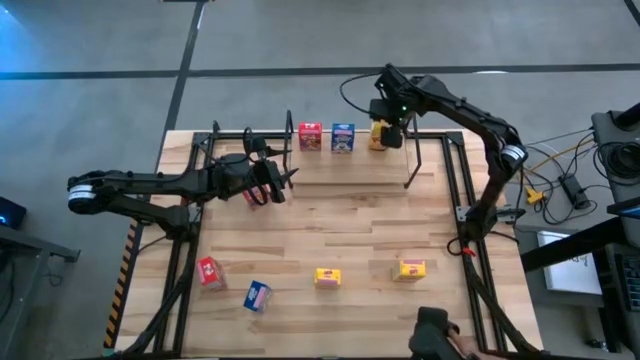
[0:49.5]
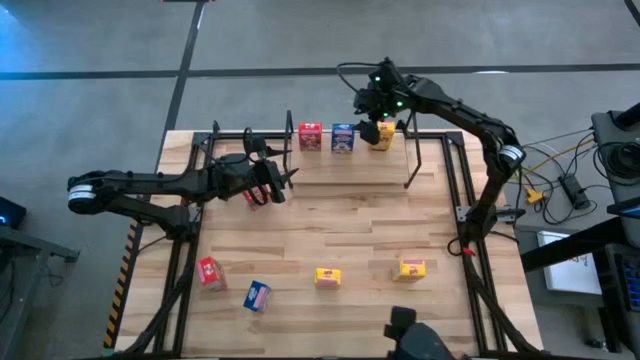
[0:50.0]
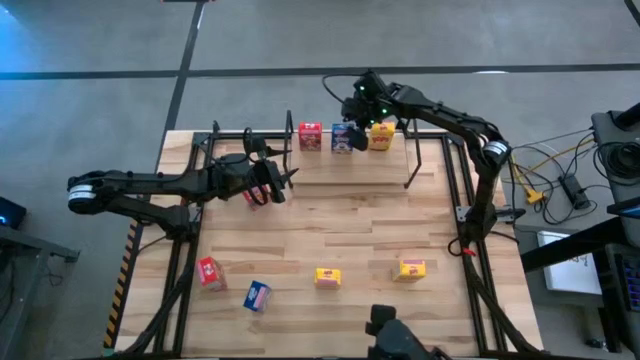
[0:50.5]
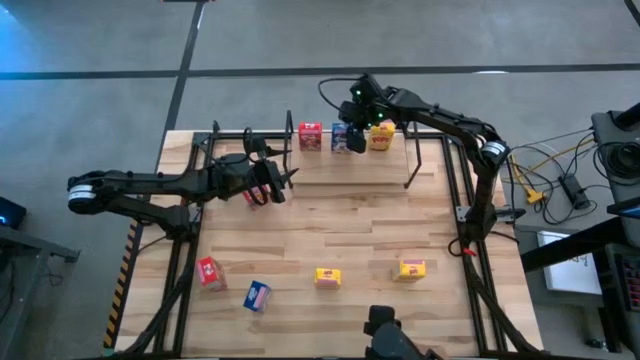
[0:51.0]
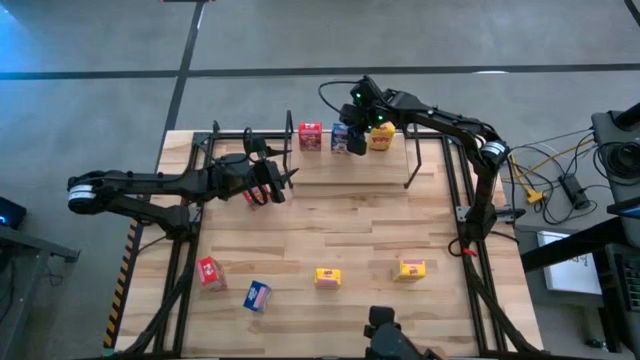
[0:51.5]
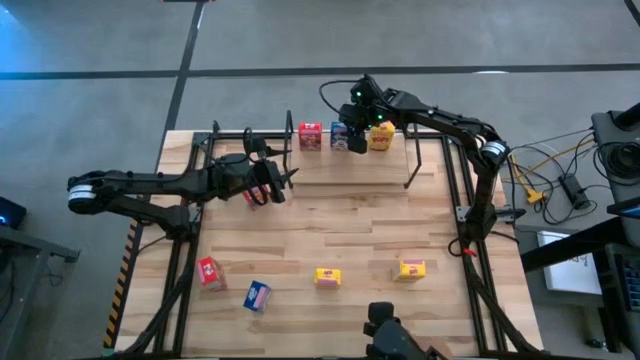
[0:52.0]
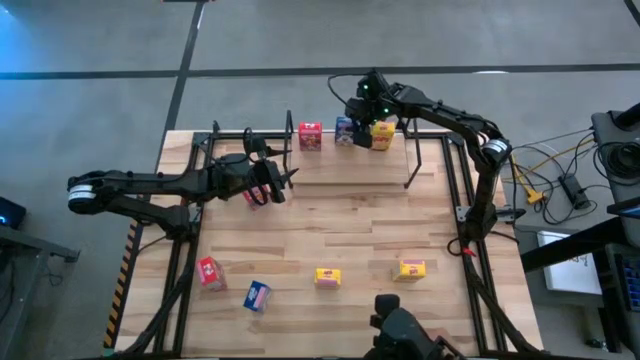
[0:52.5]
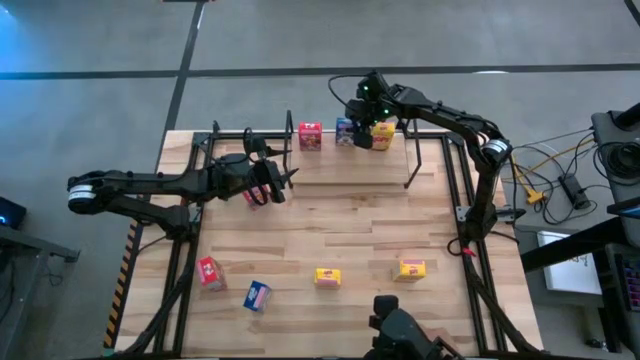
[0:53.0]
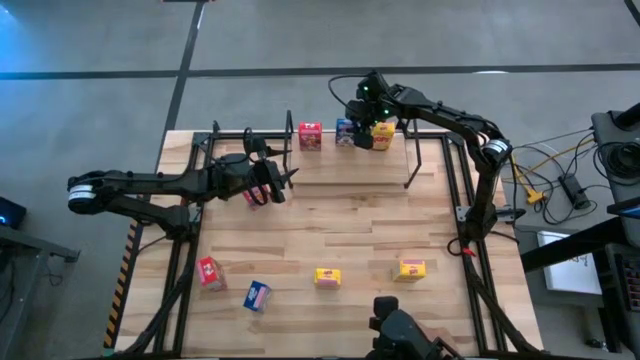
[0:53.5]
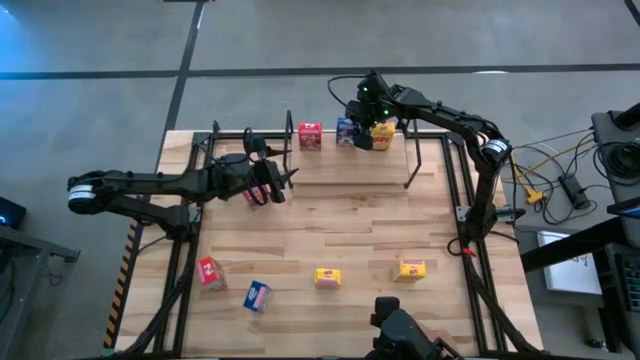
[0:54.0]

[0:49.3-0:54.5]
Task: Stack cereal on shelf
Adjust the blue cereal box on the shelf

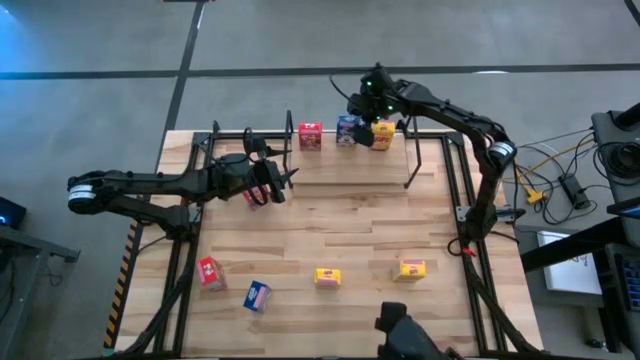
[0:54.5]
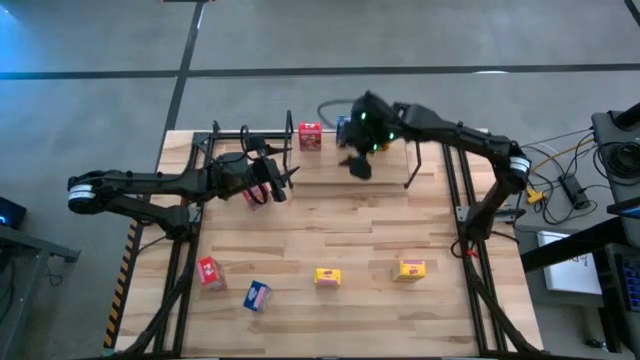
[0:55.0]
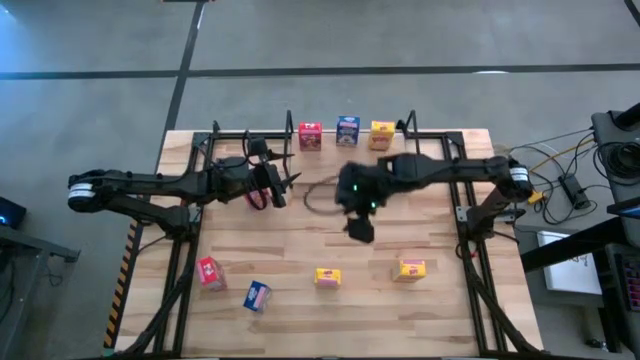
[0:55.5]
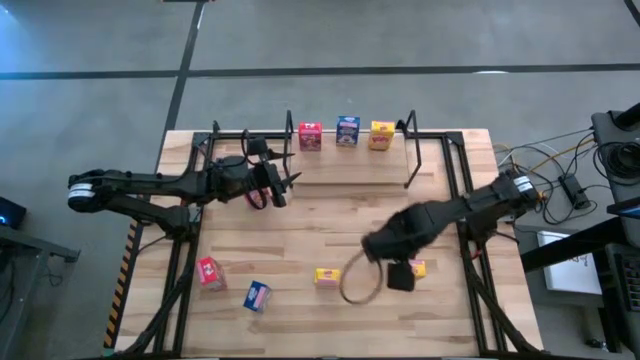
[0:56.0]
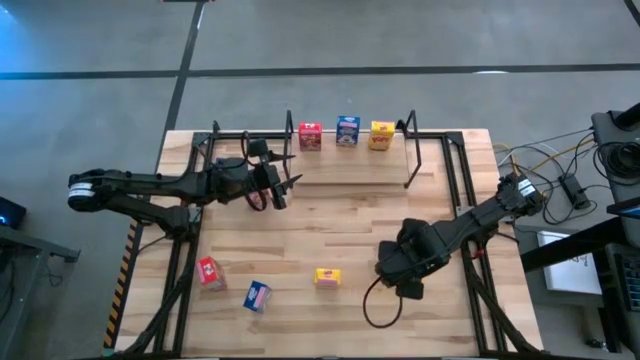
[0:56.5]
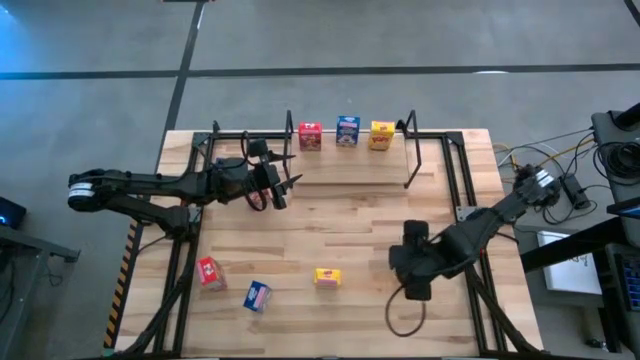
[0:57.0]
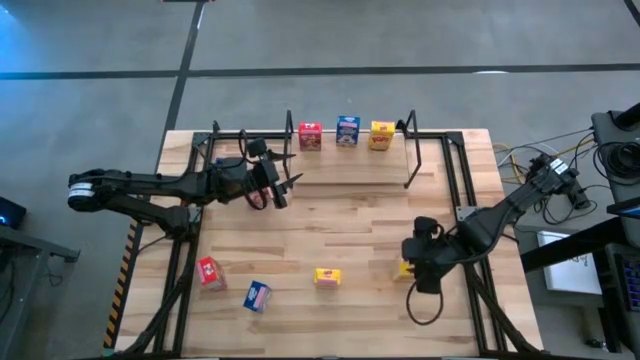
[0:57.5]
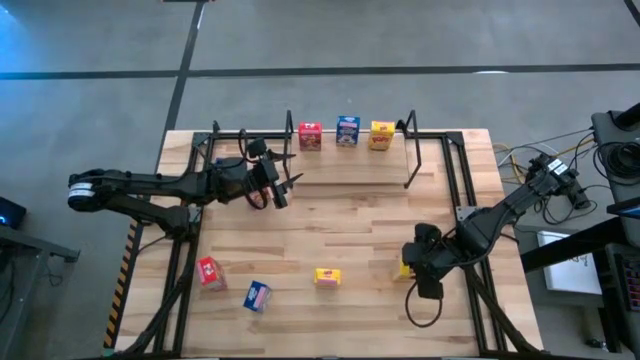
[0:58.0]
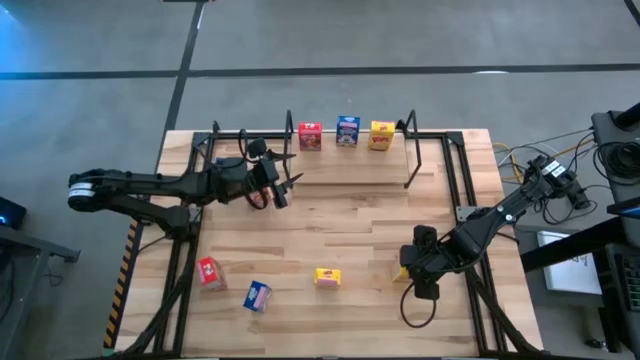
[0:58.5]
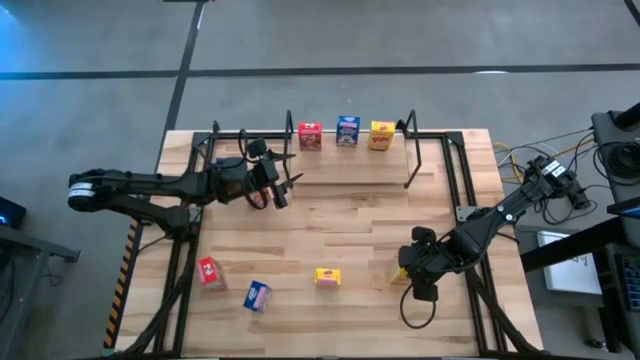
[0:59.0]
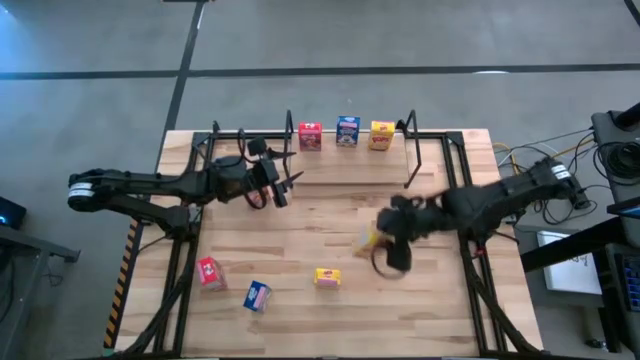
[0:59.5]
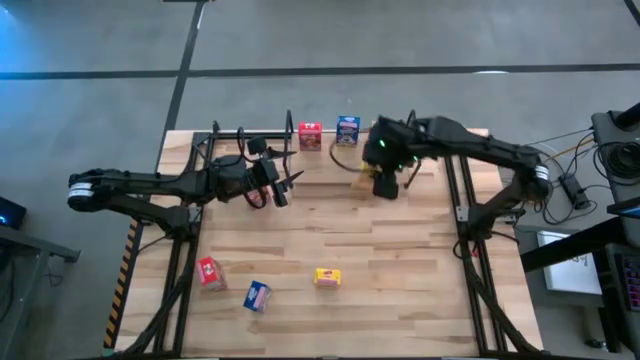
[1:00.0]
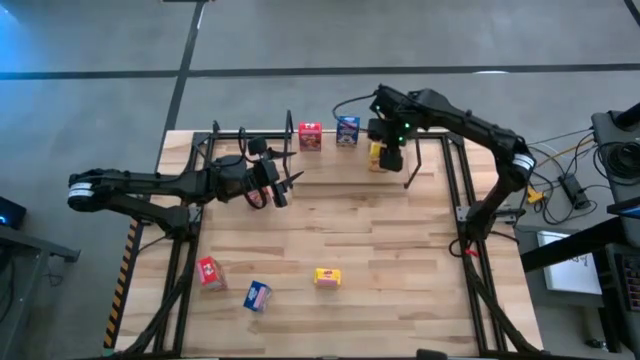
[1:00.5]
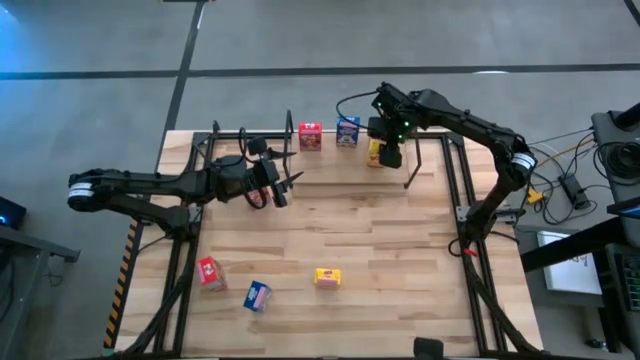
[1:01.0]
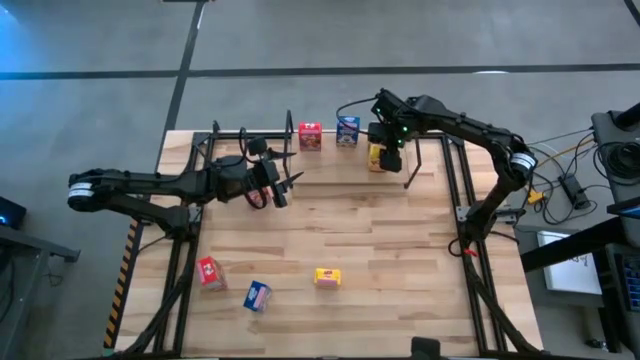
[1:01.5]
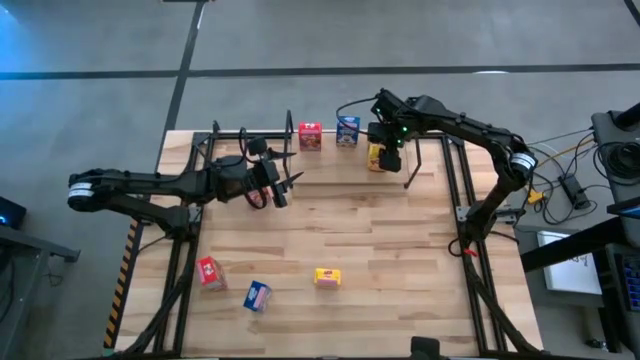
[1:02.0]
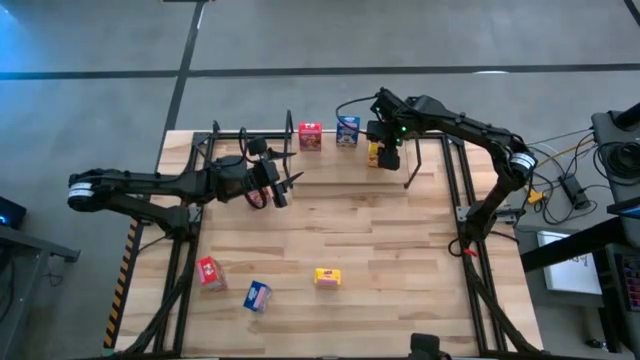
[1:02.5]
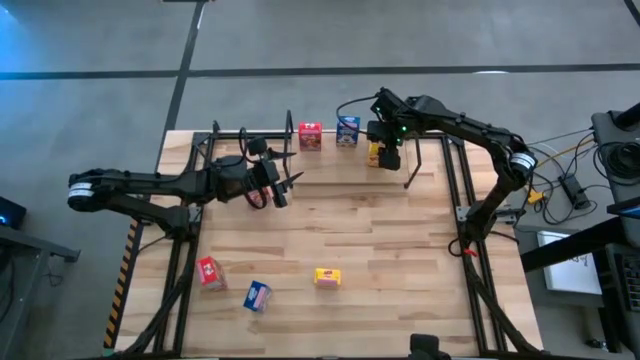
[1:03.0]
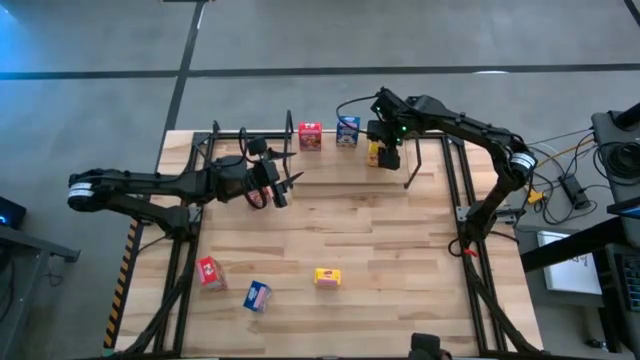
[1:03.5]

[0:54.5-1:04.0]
Put the right yellow cereal box on the shelf aligned with the other yellow cereal box

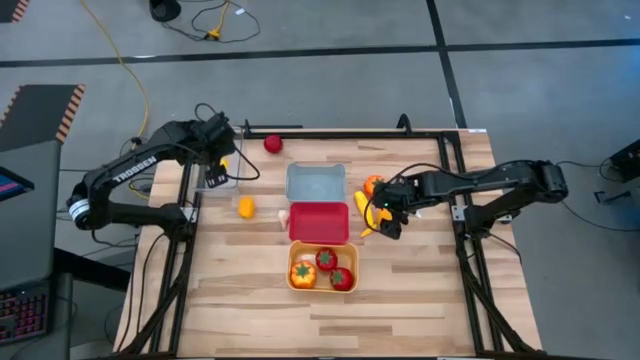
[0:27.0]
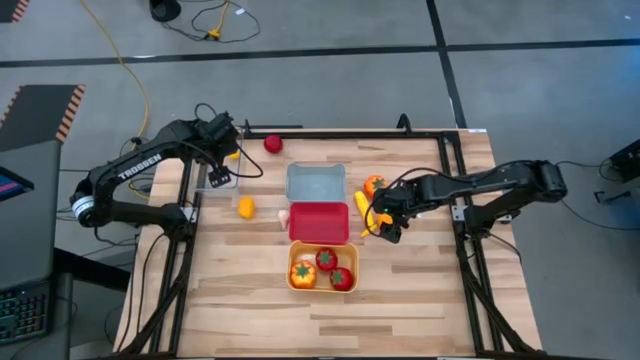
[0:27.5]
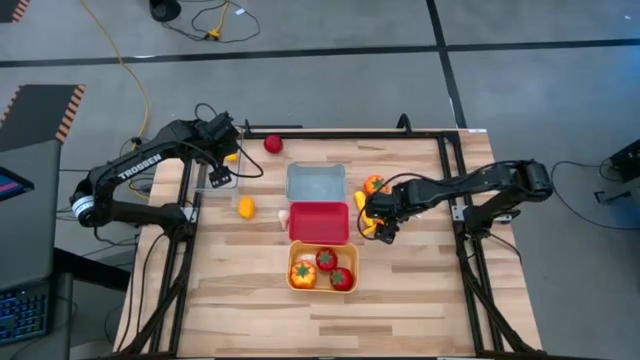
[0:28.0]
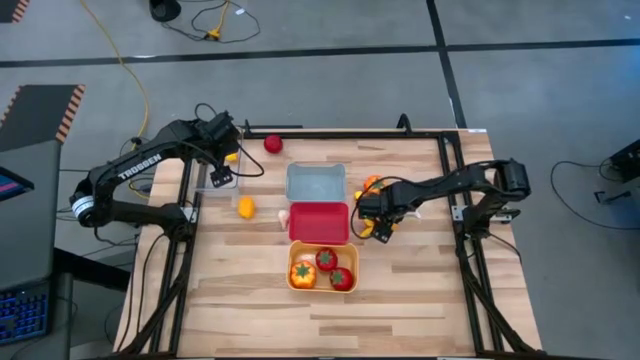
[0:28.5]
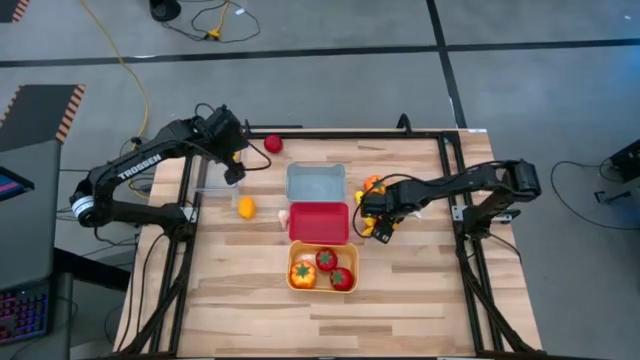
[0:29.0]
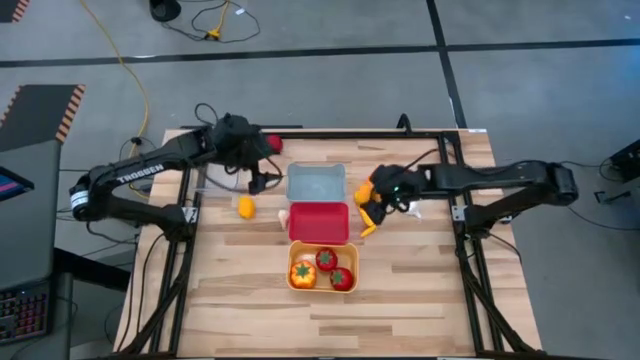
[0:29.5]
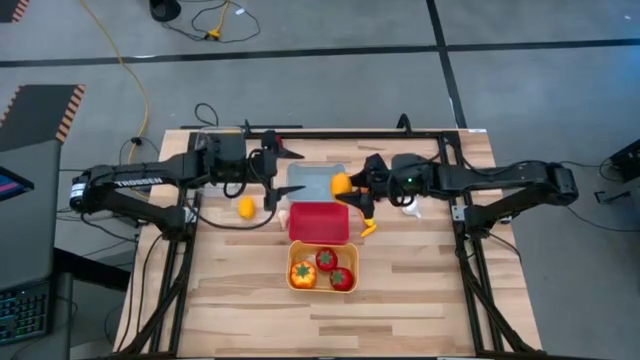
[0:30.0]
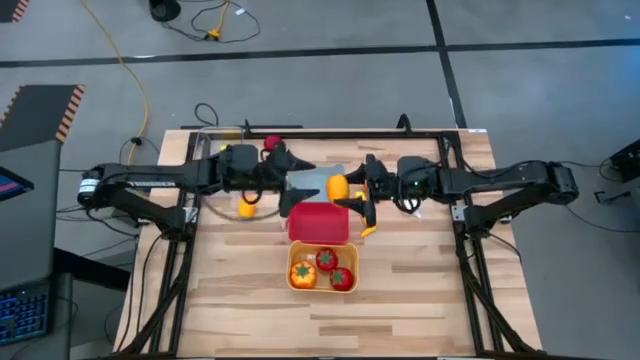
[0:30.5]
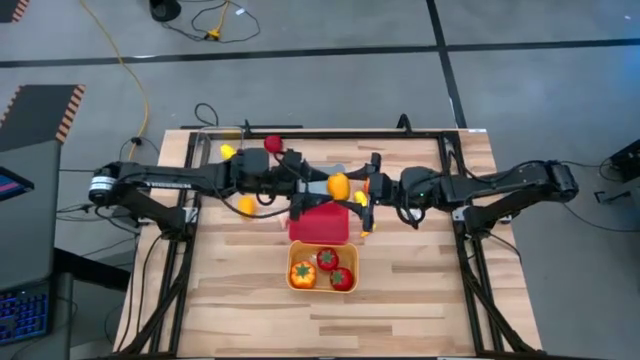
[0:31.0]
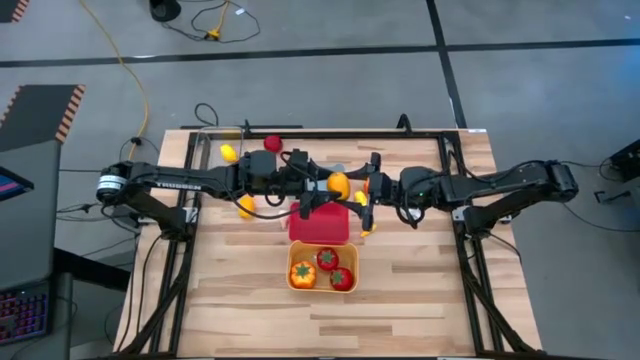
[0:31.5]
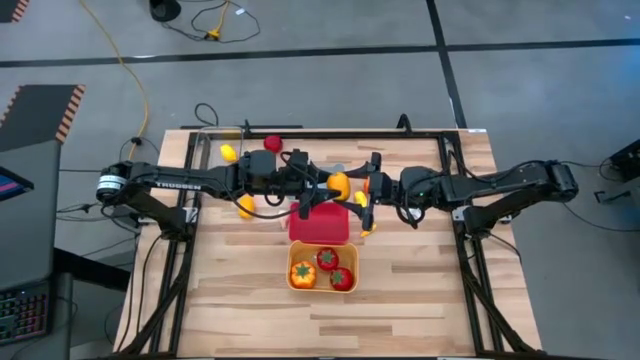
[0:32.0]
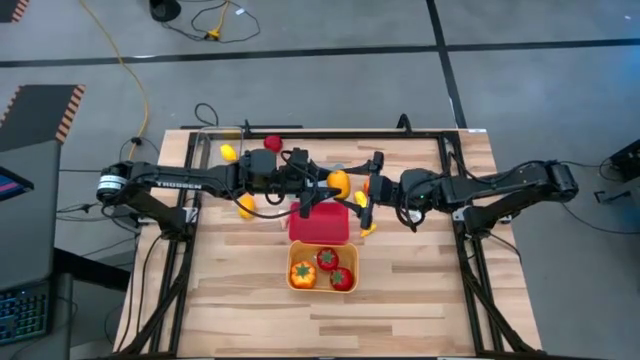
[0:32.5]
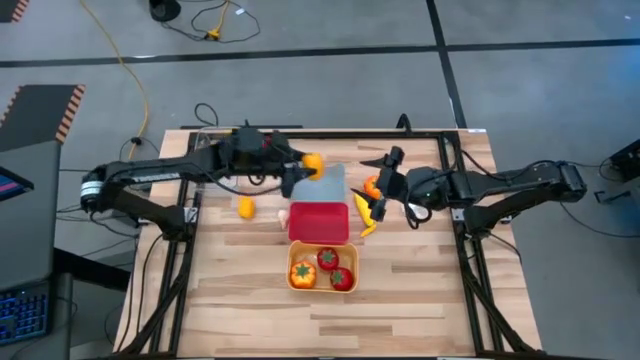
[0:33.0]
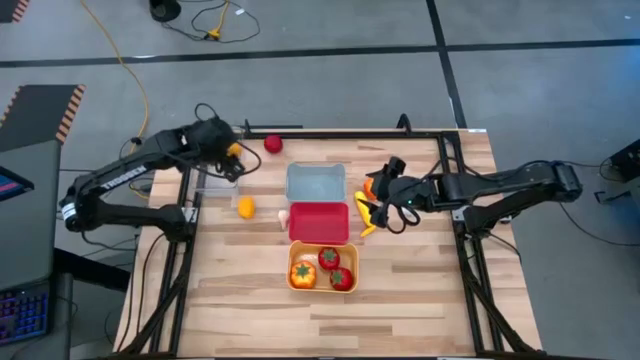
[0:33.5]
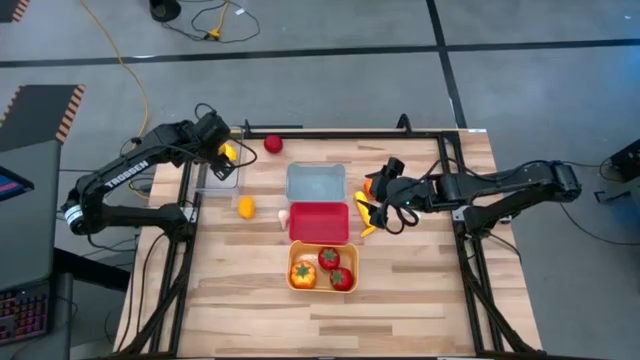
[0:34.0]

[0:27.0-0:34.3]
Task: Sort produce into baskets
Put the right yellow lemon into the transparent bin
